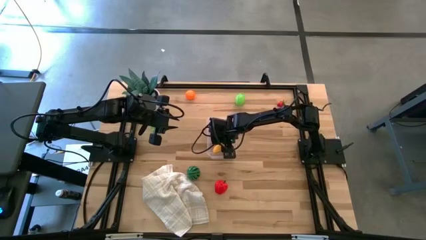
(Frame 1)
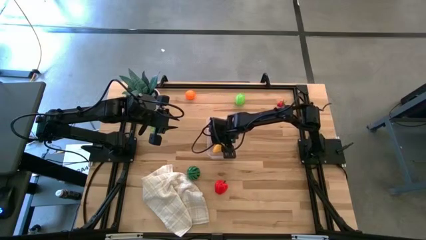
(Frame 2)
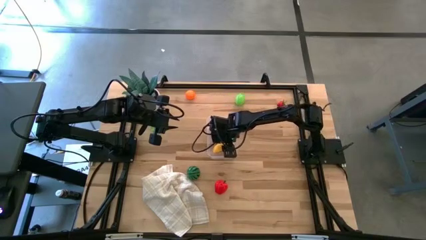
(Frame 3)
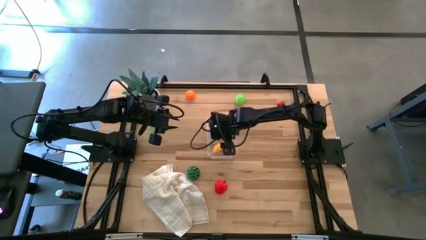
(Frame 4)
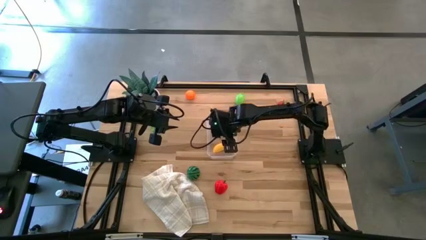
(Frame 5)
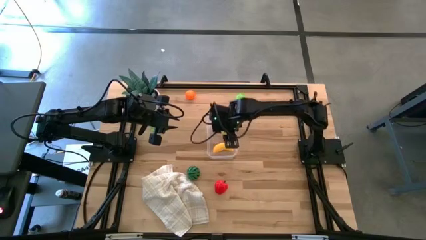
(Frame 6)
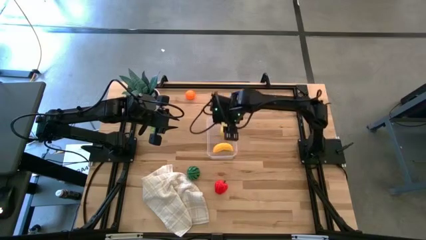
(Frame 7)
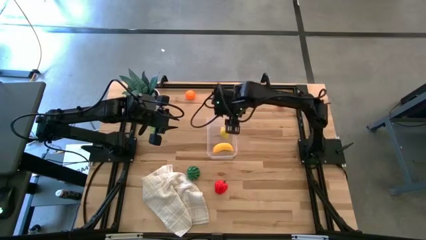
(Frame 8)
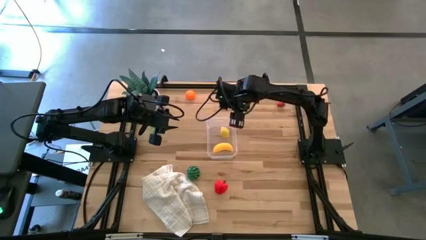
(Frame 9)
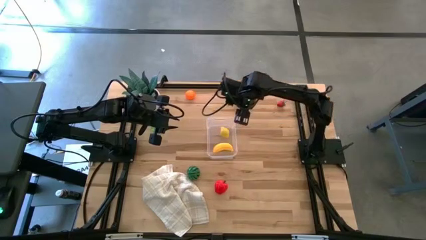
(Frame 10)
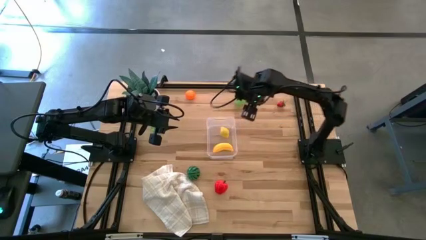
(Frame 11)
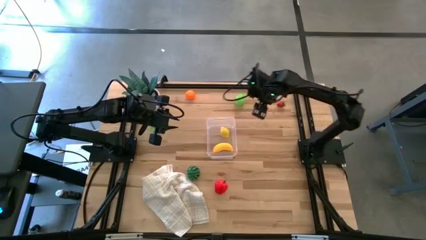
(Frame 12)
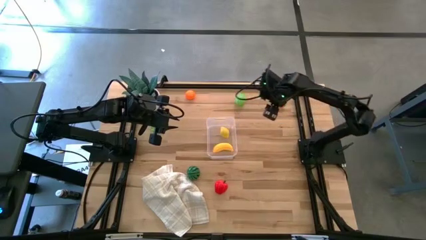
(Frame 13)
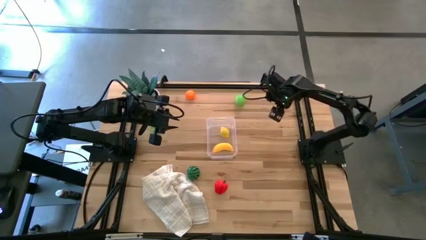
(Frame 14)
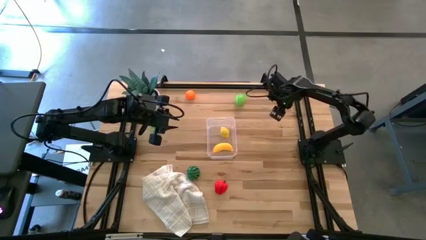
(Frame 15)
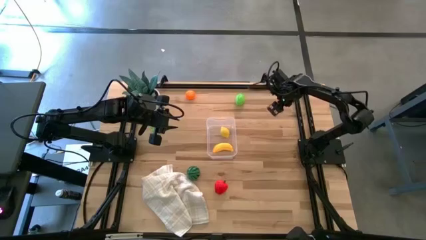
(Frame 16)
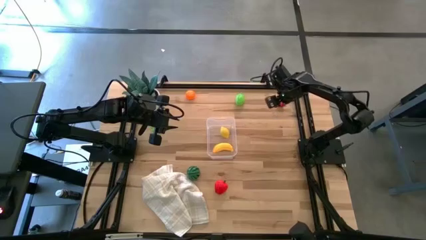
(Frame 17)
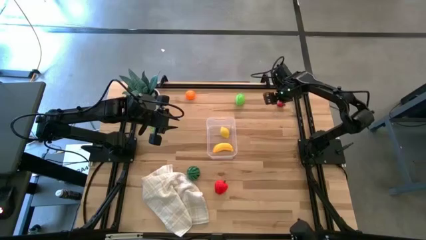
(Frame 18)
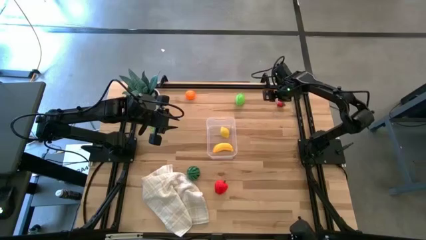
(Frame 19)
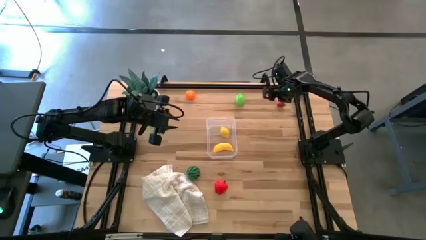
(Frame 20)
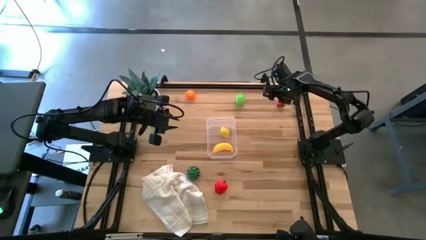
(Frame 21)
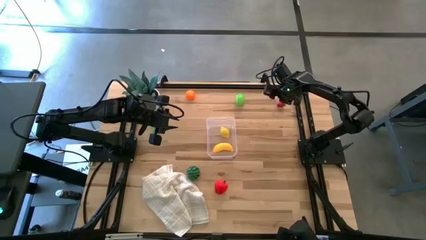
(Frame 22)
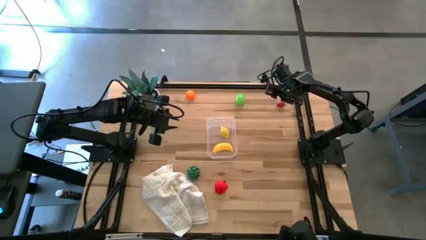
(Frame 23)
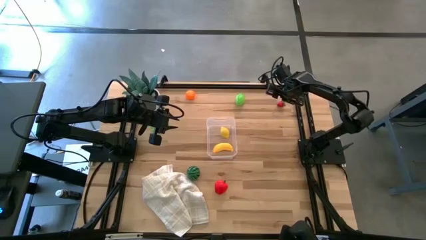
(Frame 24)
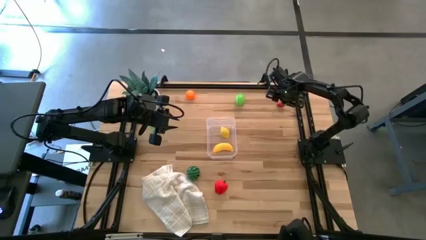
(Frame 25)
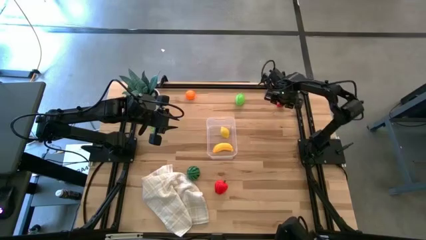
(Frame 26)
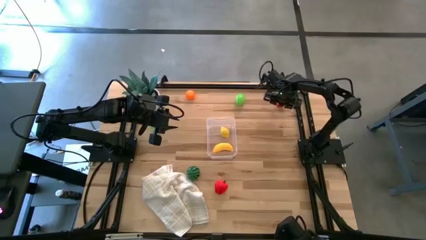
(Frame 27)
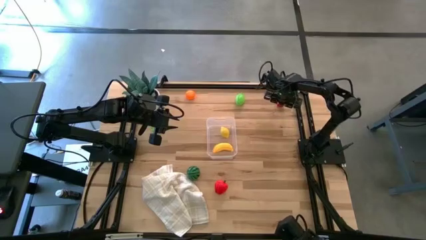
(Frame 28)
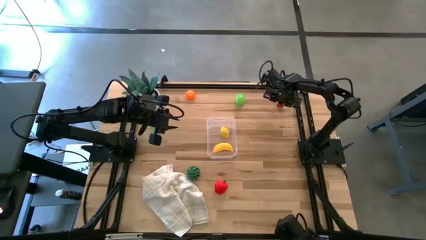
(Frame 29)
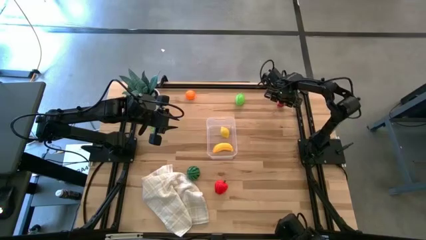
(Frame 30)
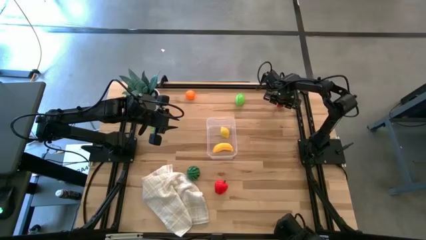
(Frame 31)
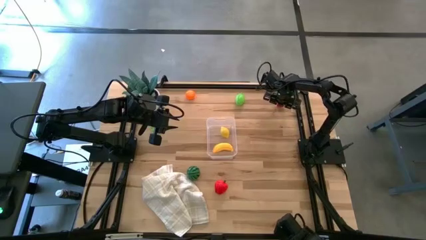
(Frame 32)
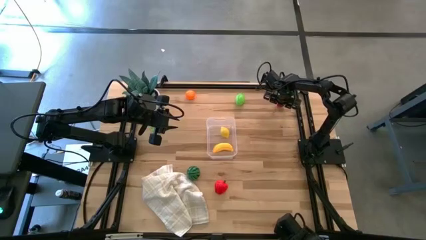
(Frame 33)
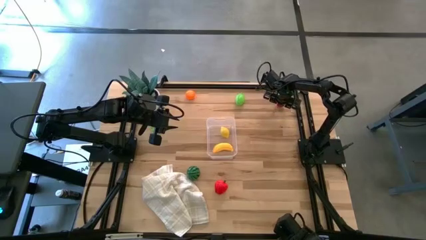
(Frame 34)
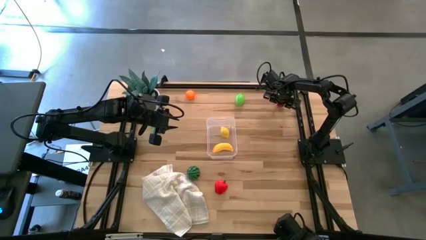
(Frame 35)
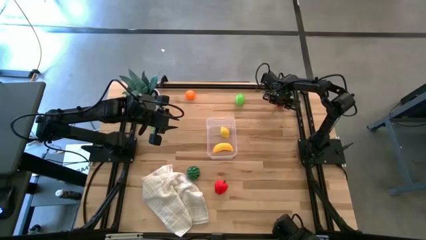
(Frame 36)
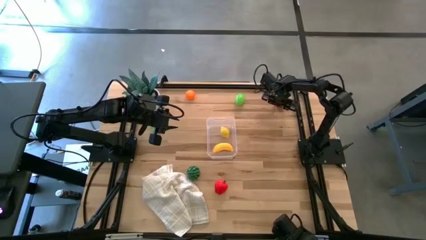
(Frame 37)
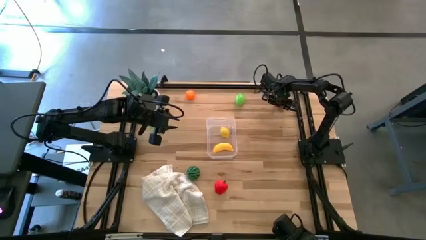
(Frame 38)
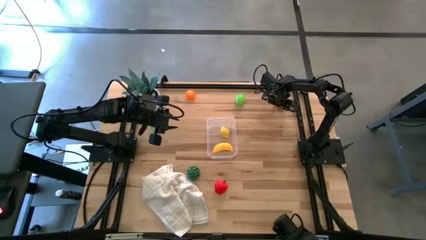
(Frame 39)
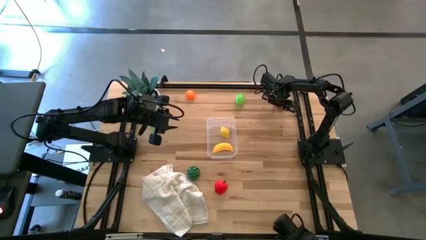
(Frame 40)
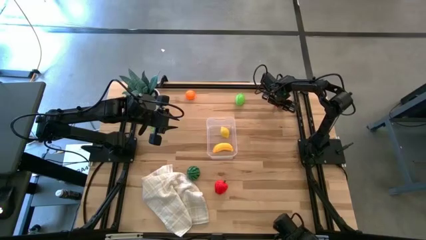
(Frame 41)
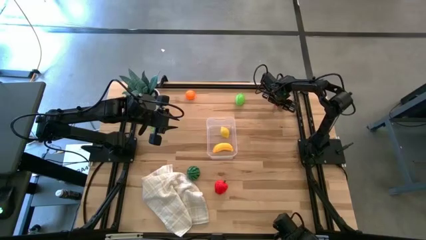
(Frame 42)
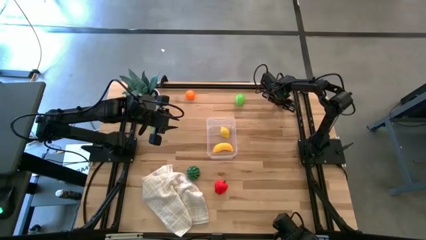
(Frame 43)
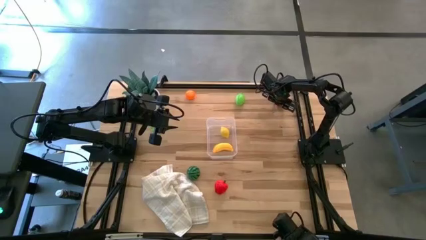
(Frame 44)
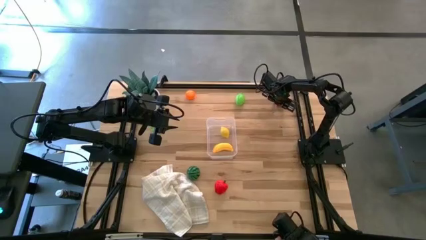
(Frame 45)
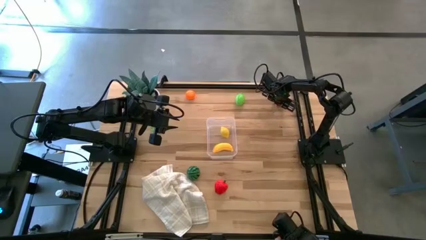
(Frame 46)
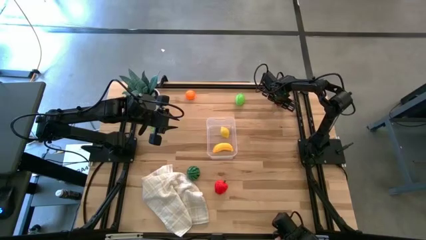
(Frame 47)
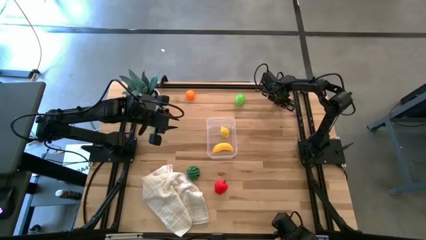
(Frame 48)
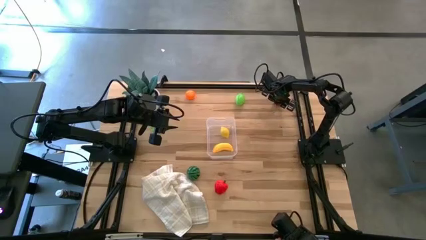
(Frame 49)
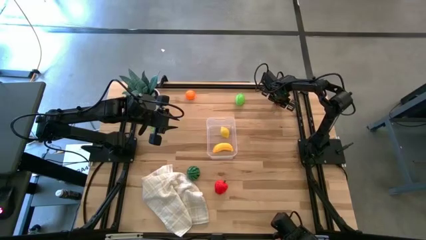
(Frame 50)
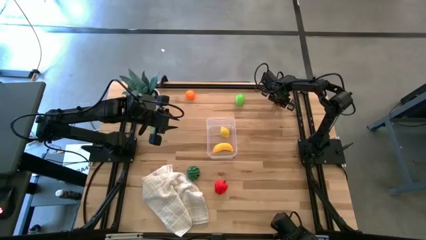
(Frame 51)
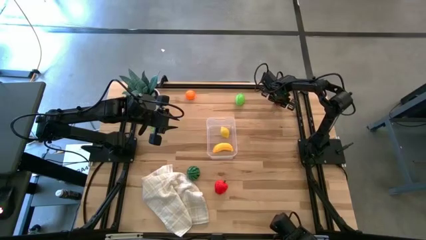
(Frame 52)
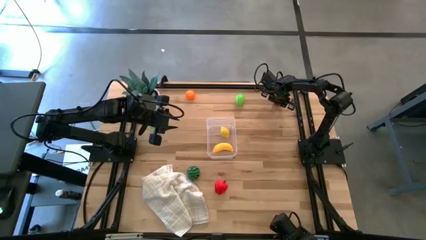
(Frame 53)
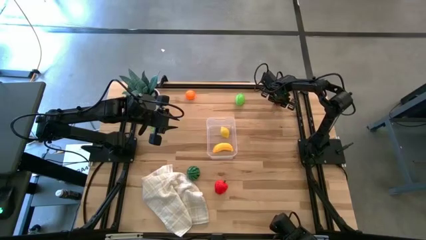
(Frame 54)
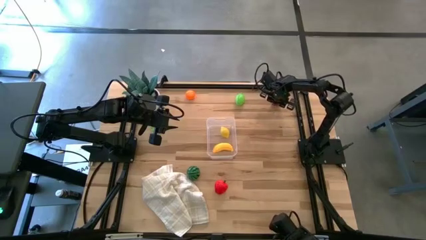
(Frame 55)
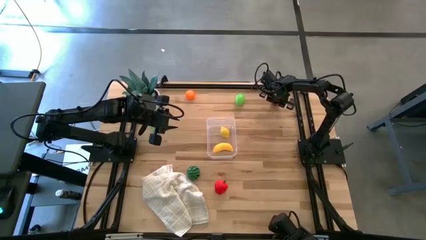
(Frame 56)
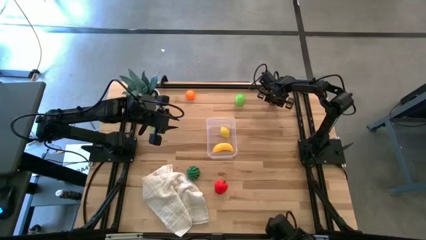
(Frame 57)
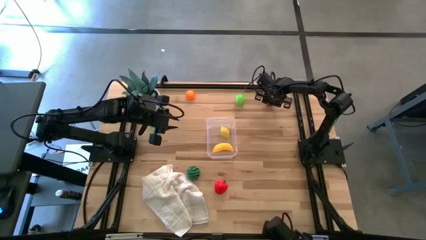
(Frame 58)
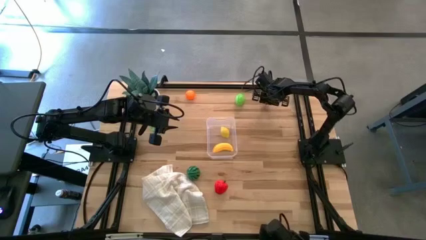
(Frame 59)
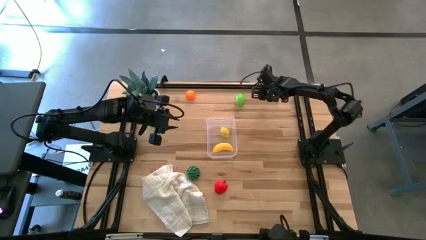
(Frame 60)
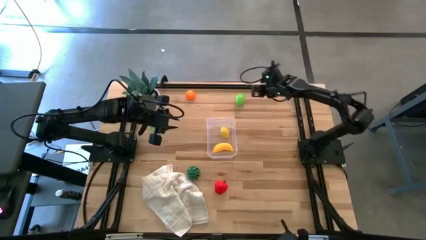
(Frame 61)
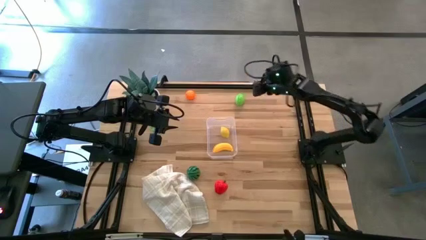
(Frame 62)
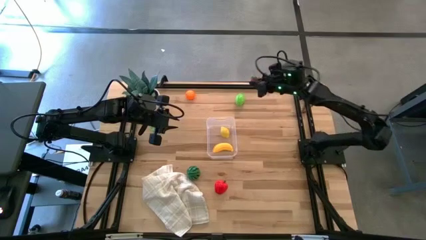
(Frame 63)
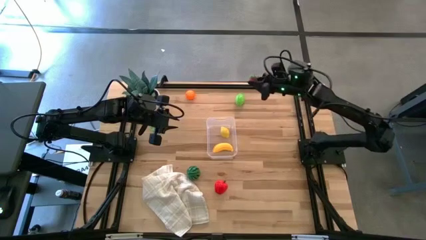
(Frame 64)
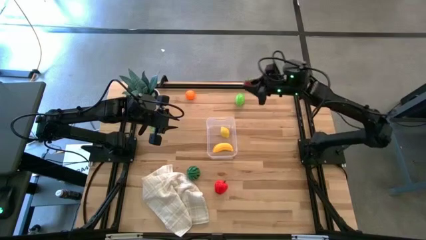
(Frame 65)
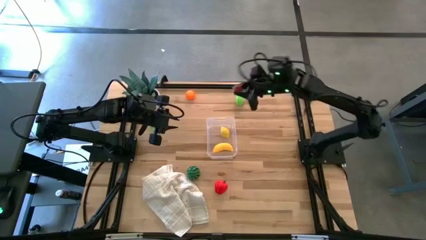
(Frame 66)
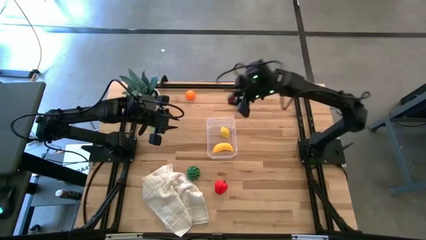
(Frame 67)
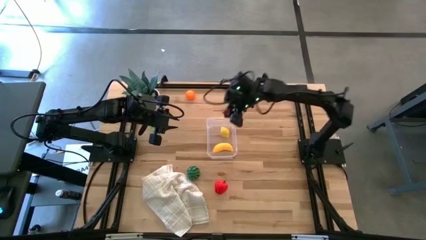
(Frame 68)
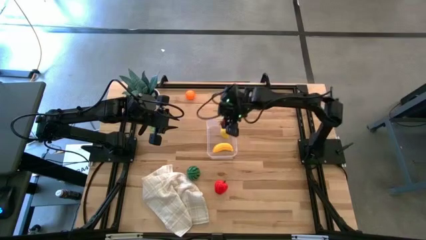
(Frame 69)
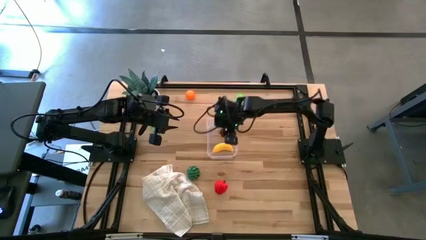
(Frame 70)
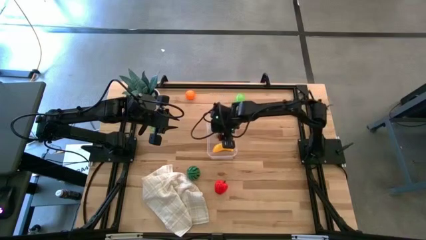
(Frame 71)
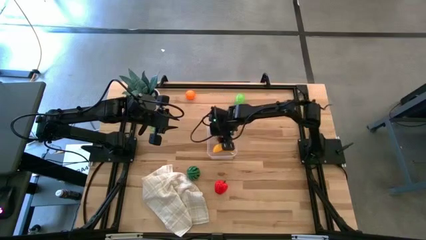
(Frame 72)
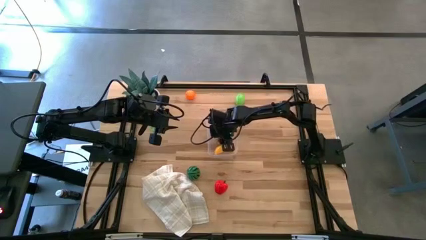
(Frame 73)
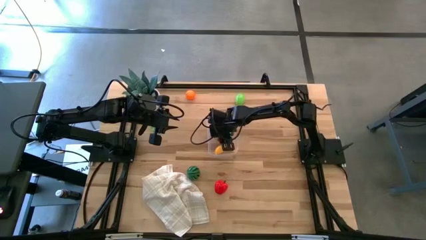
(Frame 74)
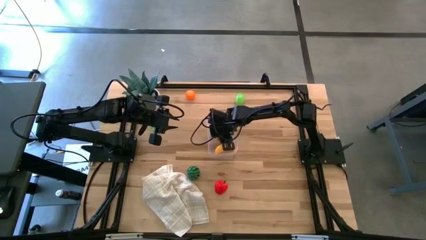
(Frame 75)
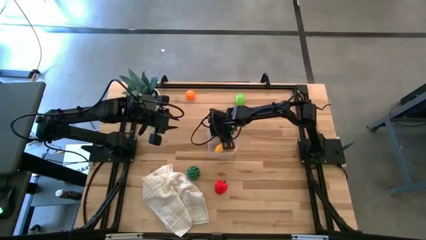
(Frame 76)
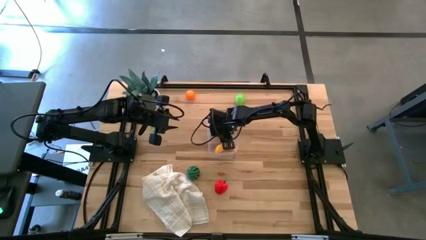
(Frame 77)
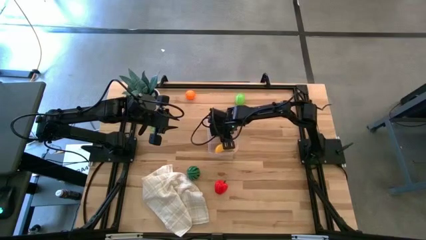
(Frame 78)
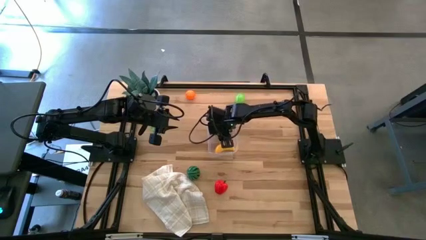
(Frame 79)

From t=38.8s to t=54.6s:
Task: Pick and placing Produce into tupperware
Put the red strawberry into the transparent bin
